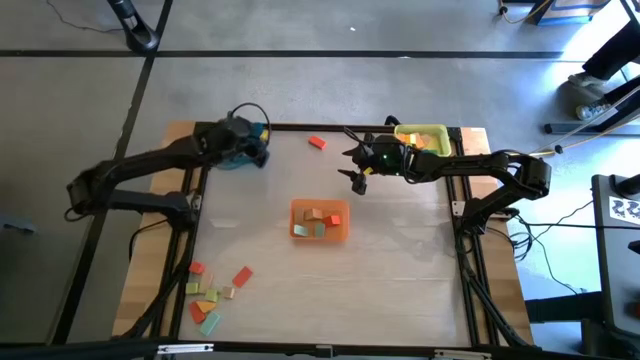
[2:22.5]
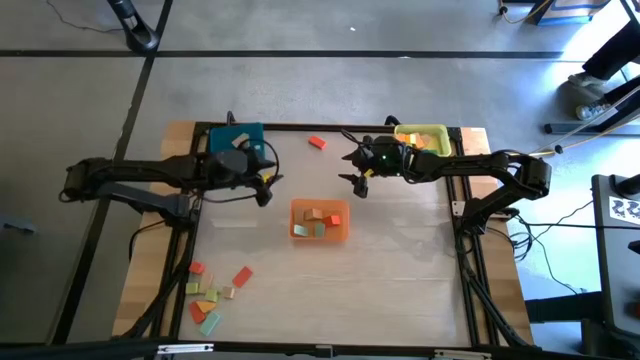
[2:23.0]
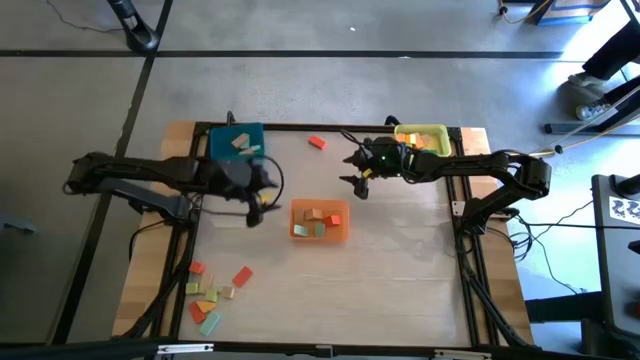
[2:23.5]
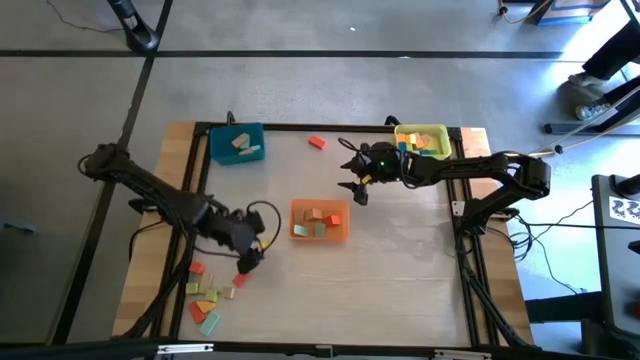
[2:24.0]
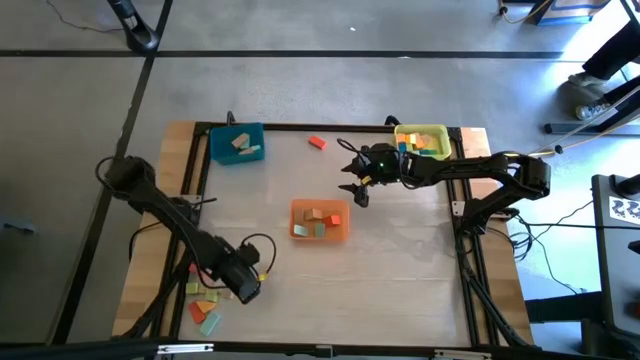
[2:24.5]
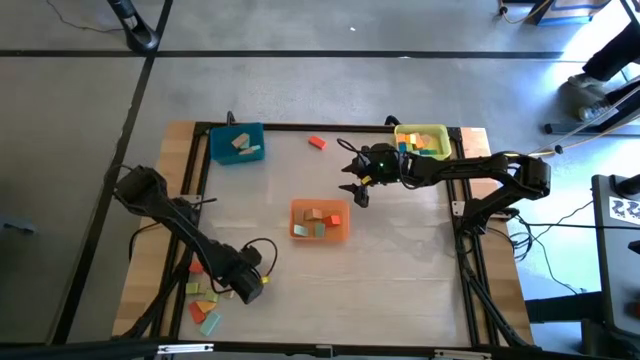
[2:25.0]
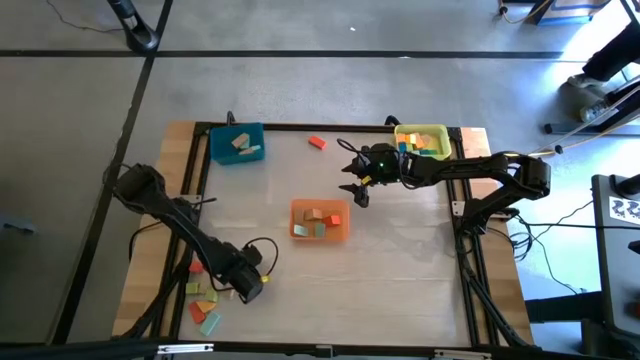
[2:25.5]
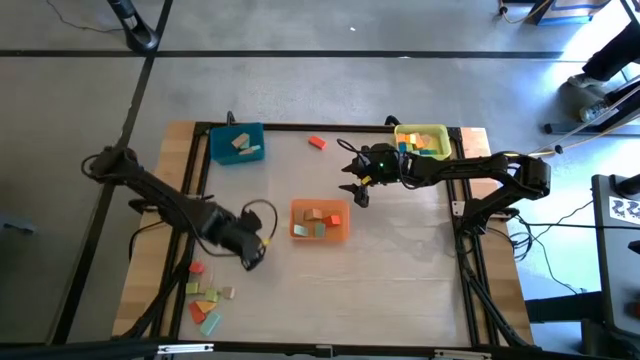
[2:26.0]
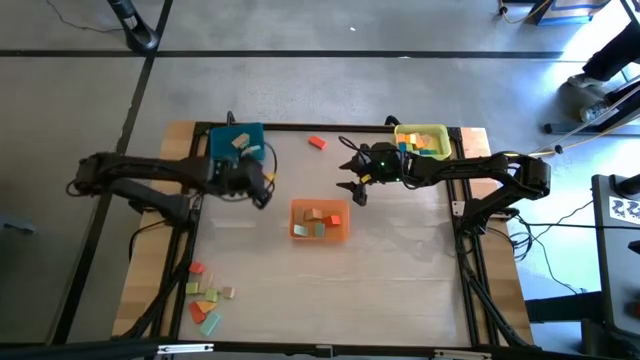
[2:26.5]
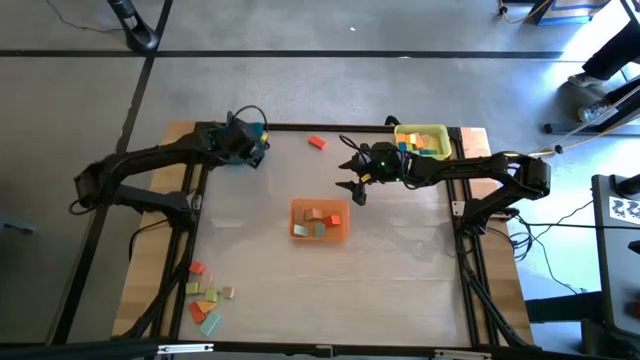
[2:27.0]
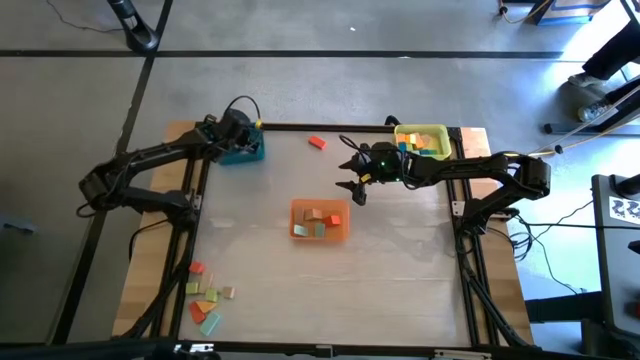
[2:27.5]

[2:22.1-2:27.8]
Task: Sort blocks by size
Put the orange rectangular block into the blue bin

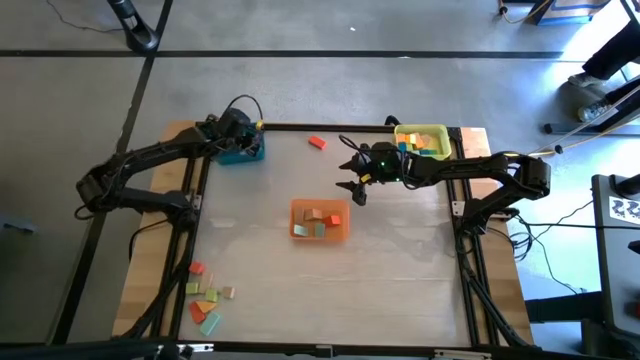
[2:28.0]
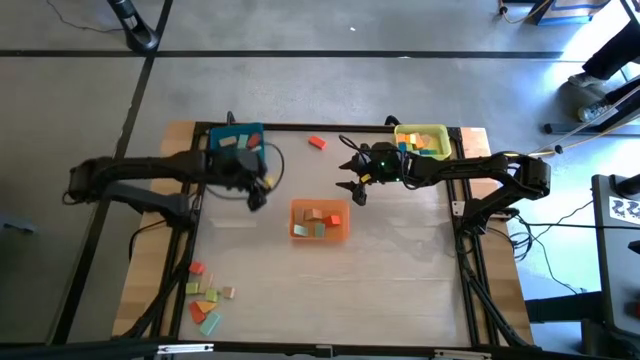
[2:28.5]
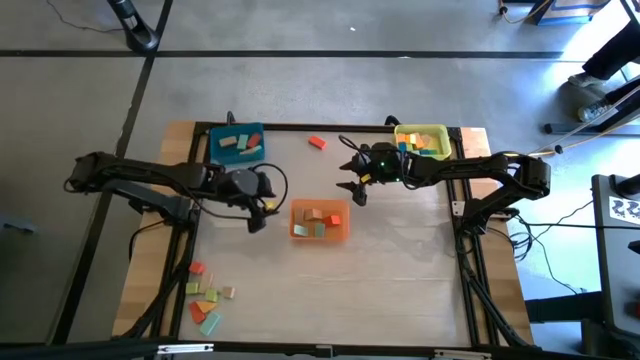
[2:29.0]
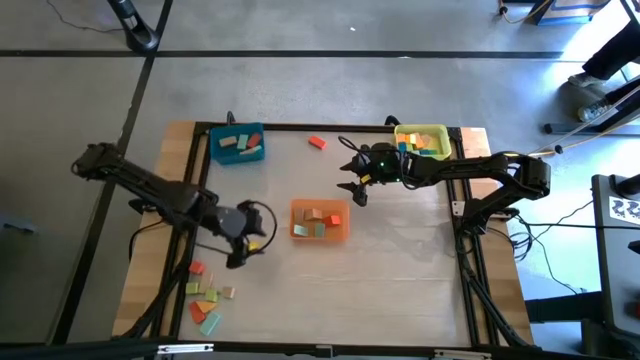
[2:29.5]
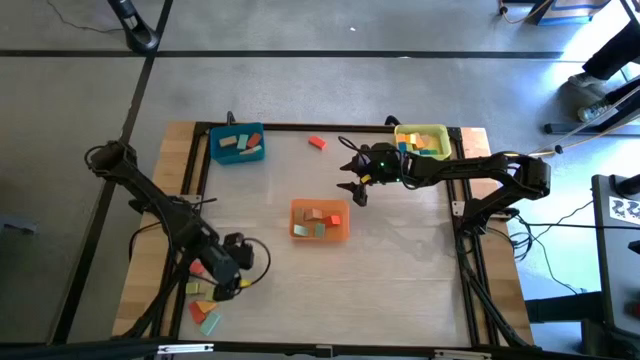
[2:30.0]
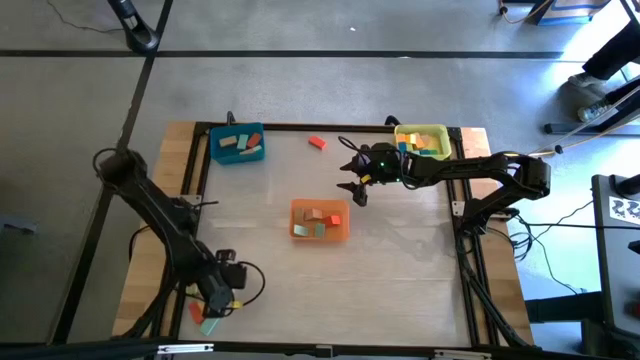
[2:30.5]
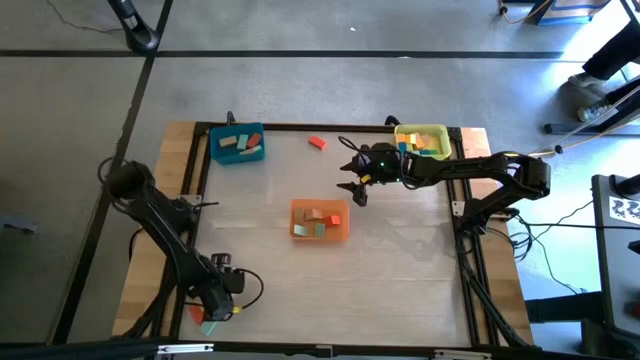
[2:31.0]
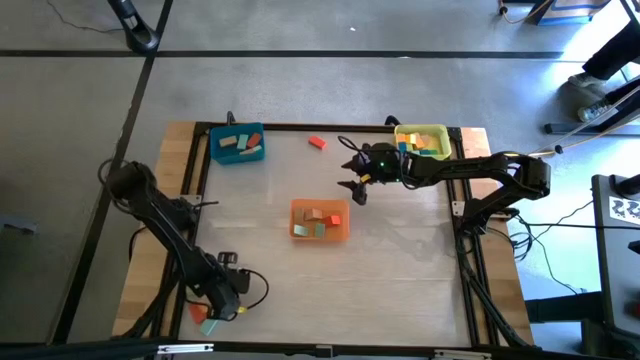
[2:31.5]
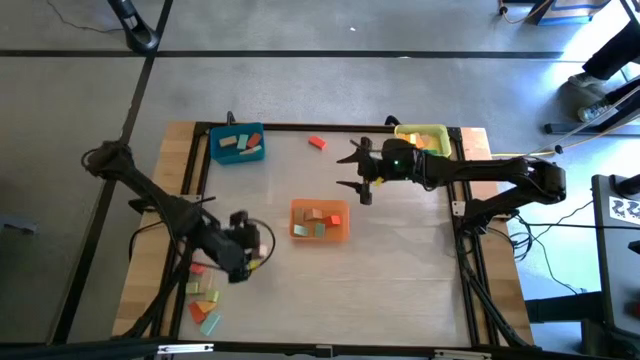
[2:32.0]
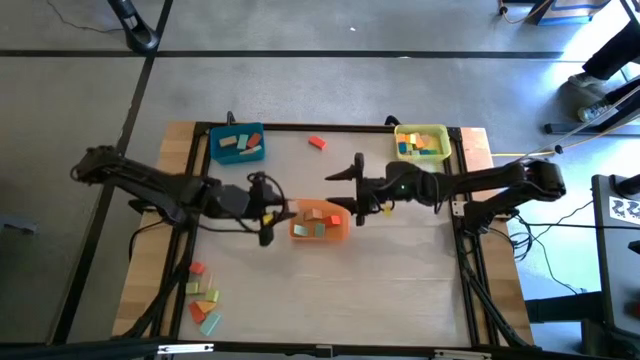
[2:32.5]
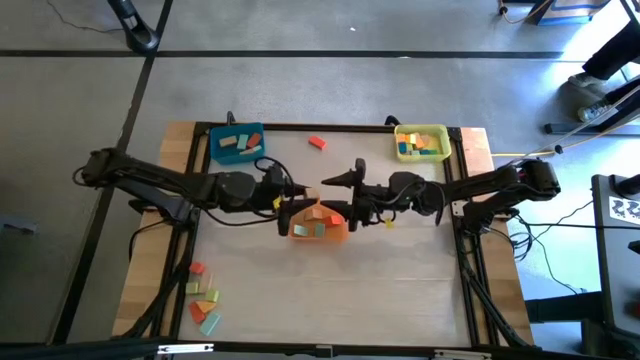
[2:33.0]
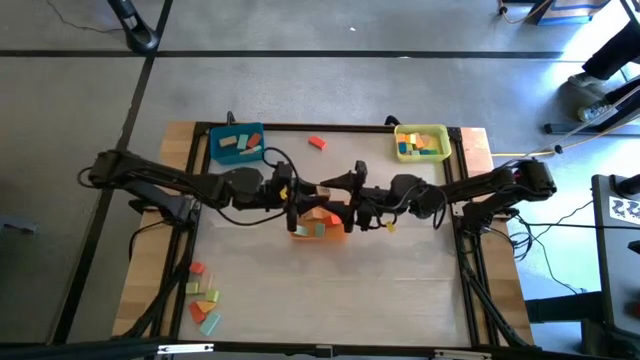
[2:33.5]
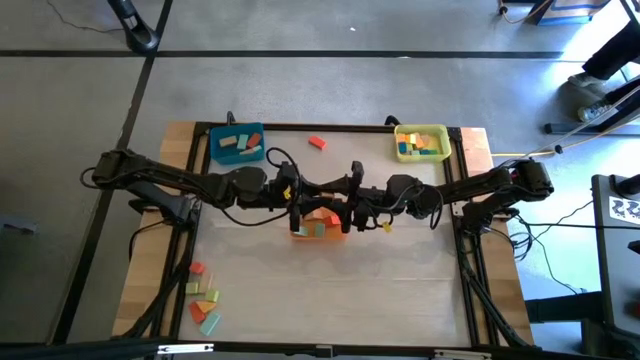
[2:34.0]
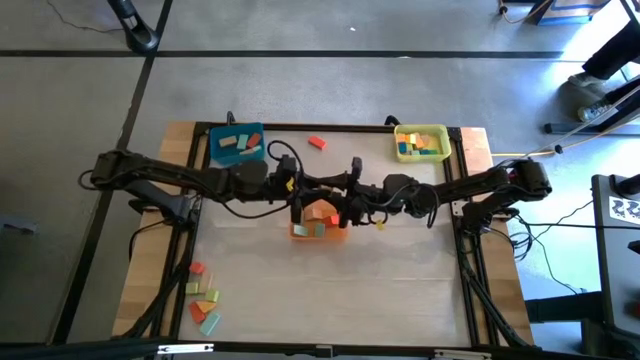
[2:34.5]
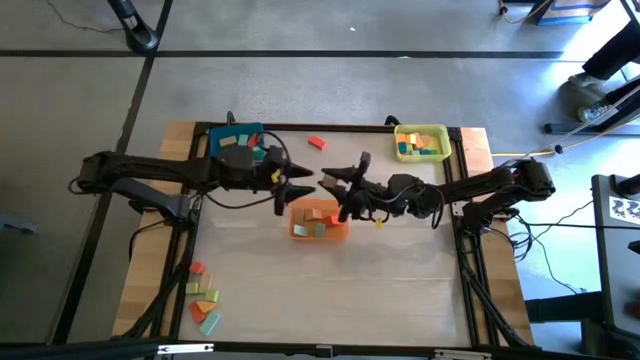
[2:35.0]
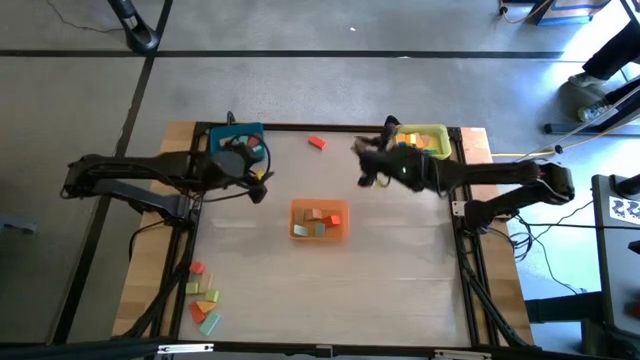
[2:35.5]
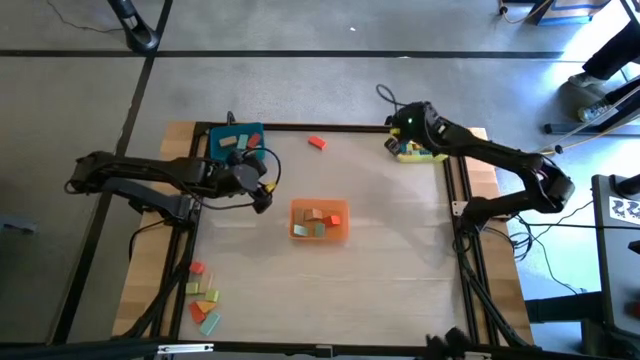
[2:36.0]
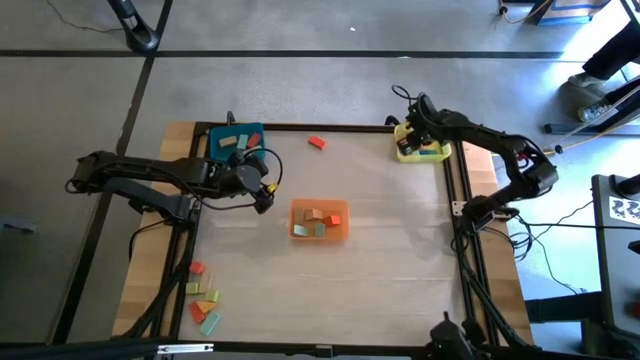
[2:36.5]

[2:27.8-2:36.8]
Put the brown cube block into the yellow bin

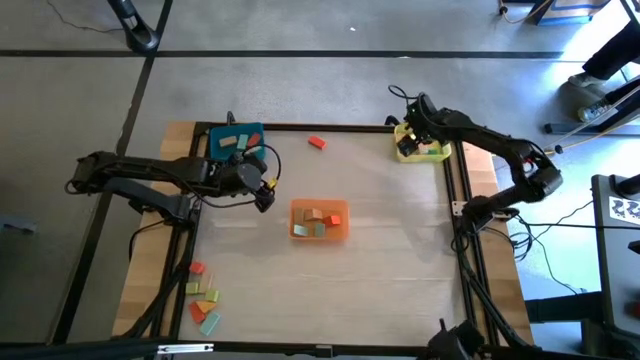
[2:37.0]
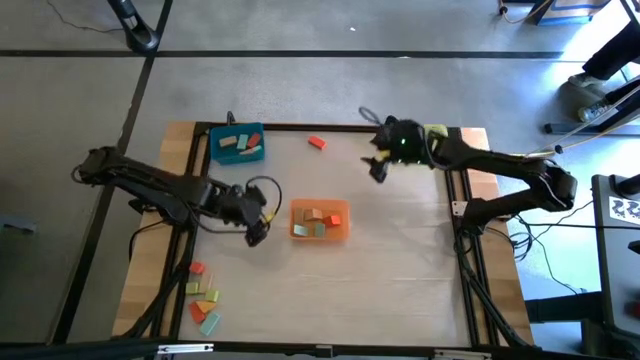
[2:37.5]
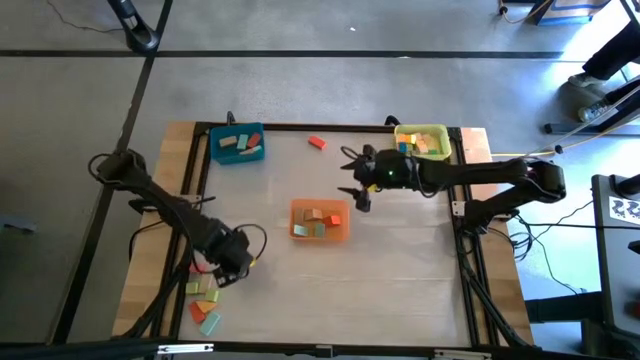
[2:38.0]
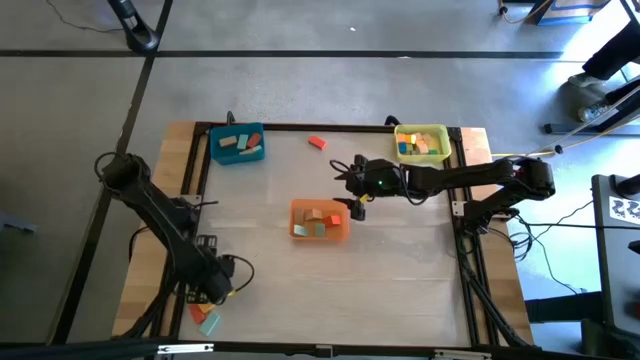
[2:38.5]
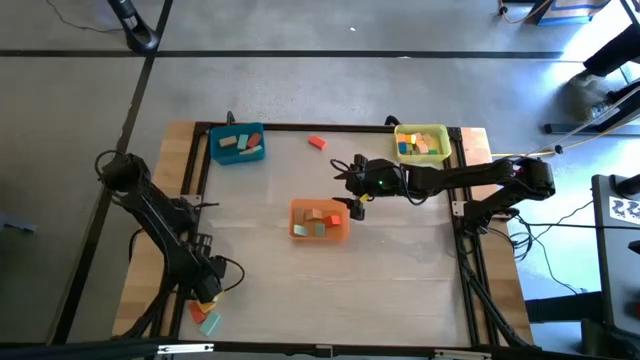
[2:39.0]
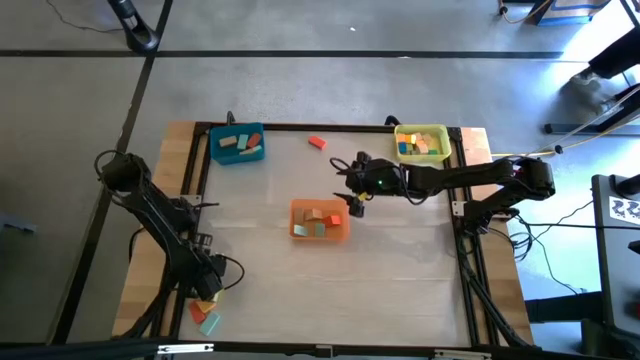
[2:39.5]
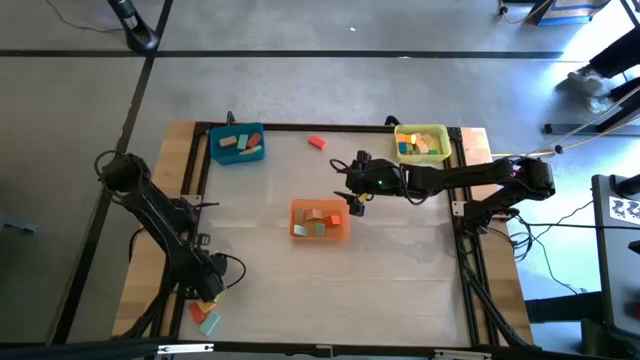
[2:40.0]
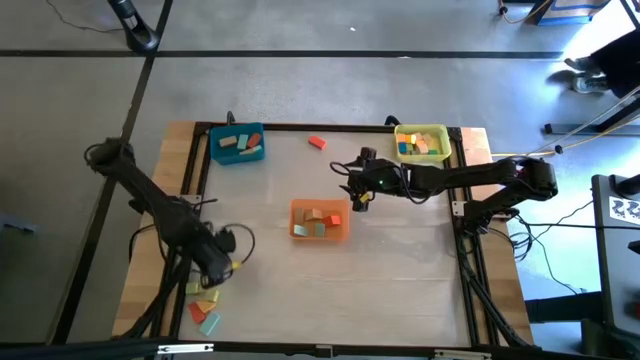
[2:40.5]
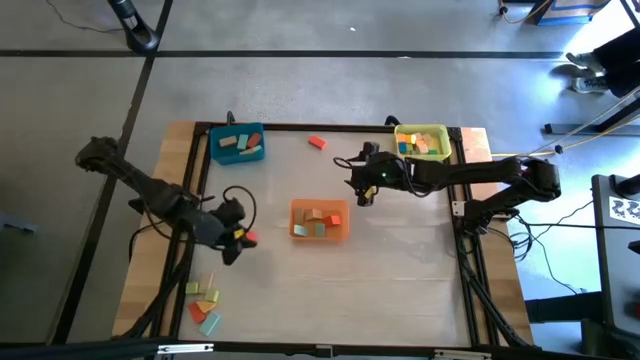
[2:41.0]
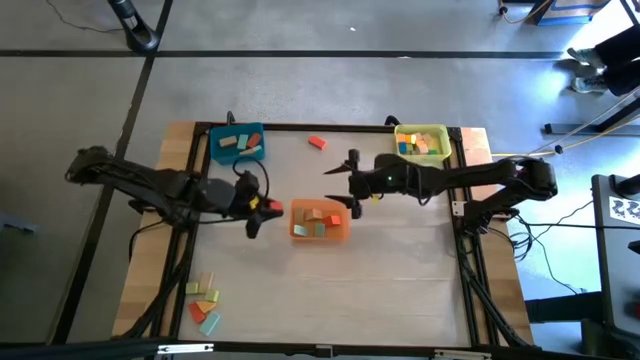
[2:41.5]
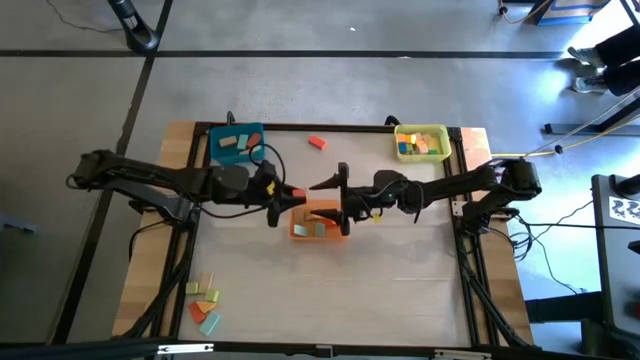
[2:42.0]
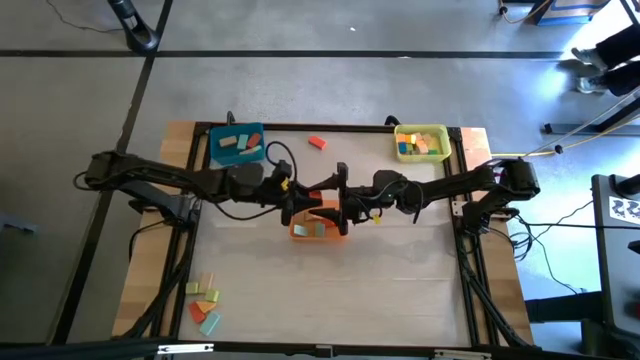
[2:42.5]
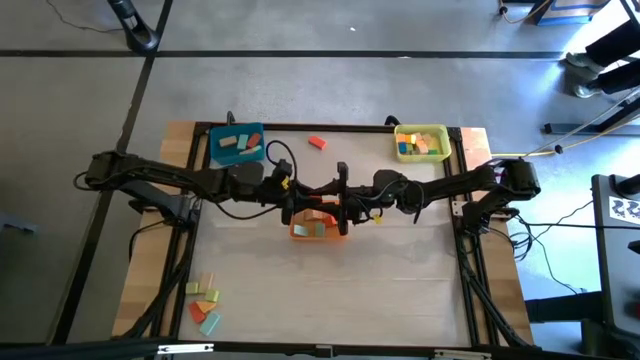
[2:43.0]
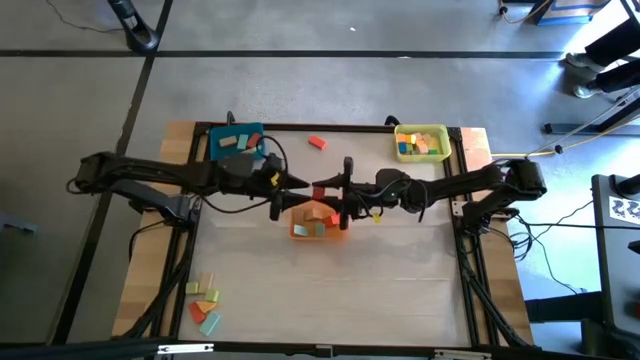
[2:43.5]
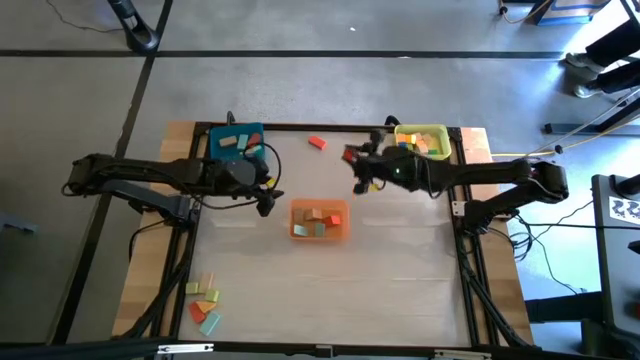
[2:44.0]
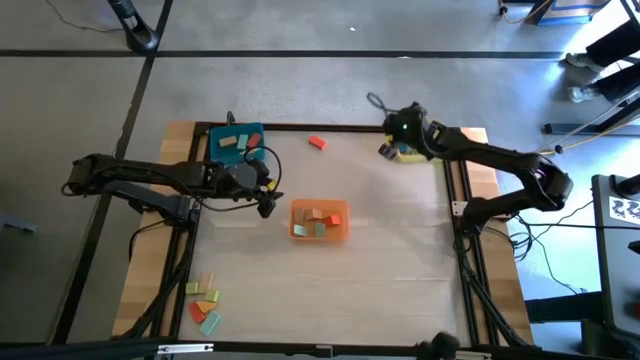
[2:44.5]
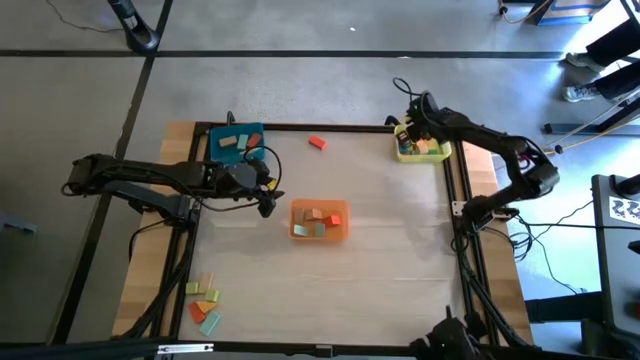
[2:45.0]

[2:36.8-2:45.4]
Put the orange cube block into the yellow bin
